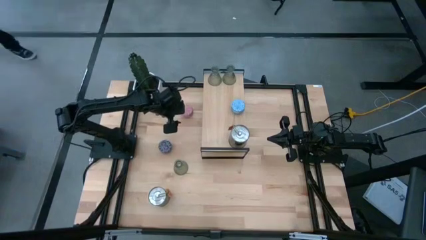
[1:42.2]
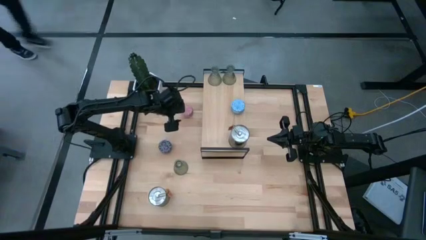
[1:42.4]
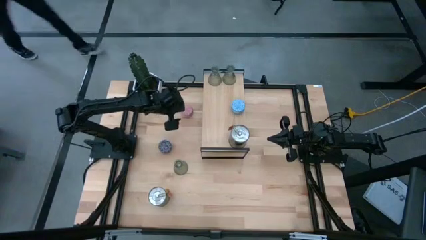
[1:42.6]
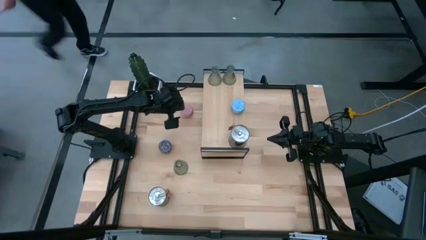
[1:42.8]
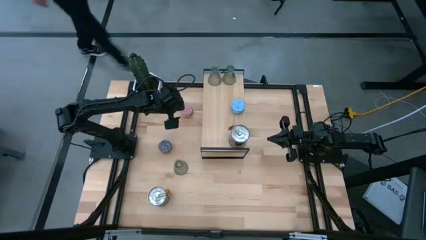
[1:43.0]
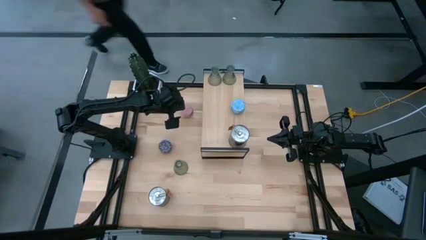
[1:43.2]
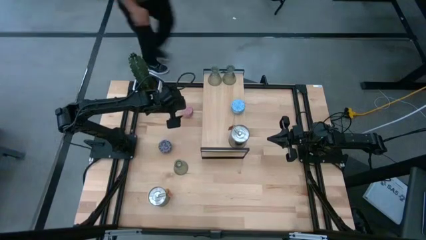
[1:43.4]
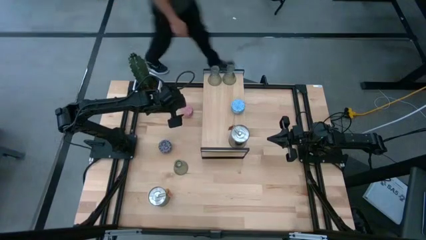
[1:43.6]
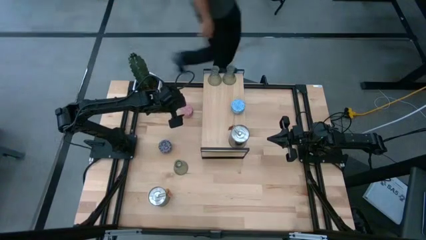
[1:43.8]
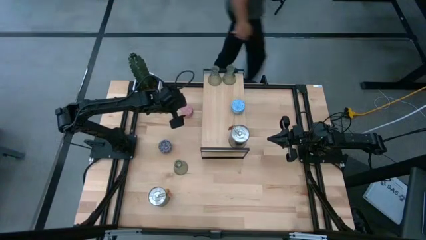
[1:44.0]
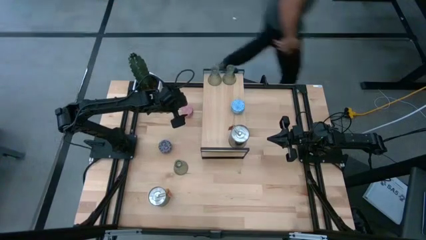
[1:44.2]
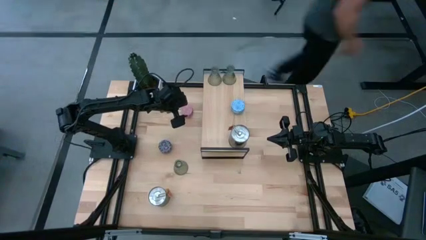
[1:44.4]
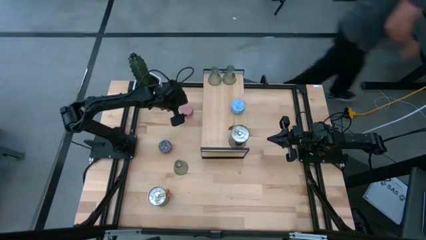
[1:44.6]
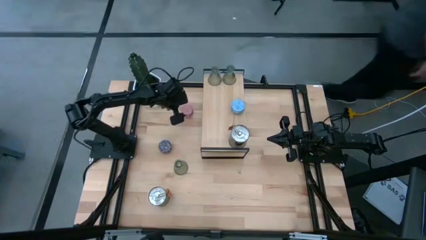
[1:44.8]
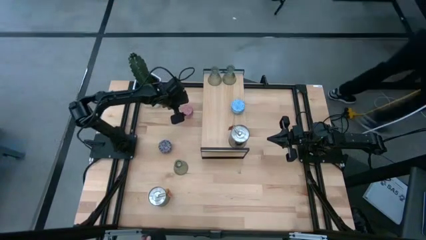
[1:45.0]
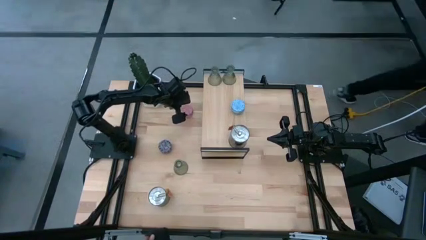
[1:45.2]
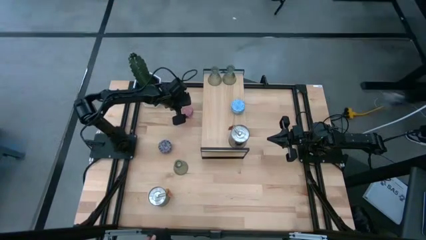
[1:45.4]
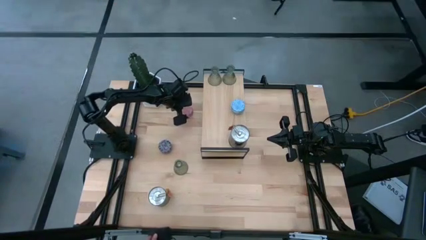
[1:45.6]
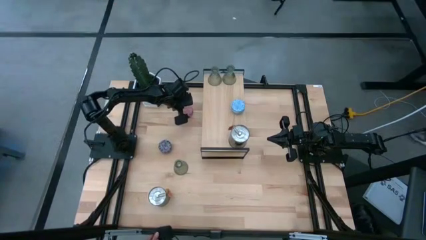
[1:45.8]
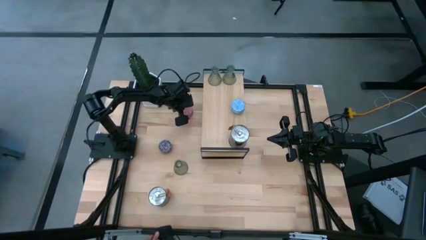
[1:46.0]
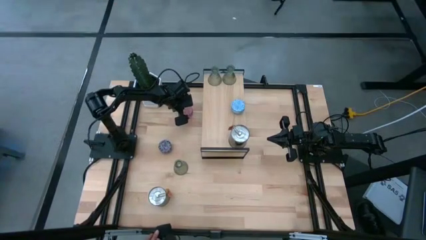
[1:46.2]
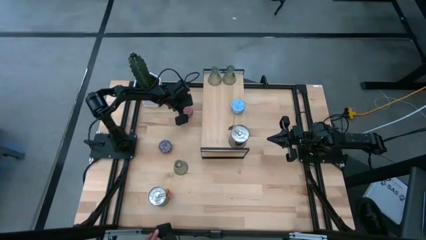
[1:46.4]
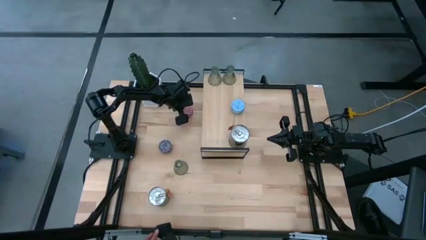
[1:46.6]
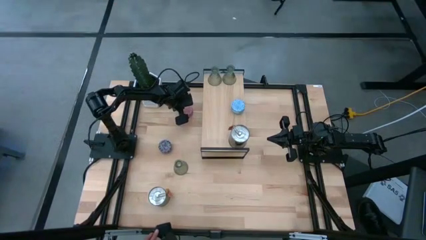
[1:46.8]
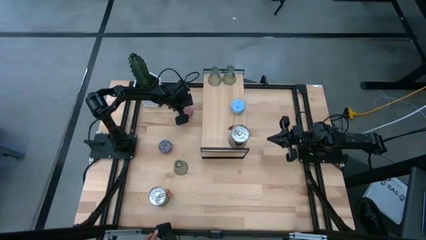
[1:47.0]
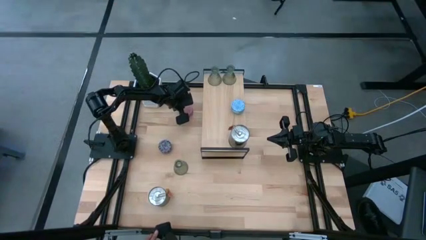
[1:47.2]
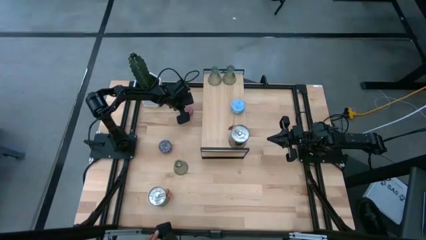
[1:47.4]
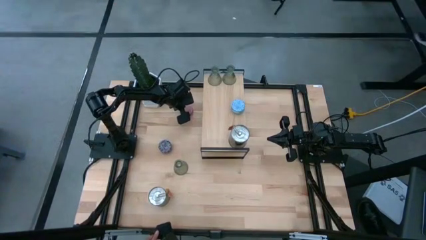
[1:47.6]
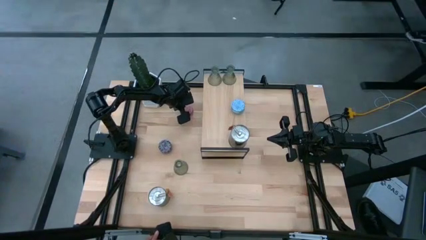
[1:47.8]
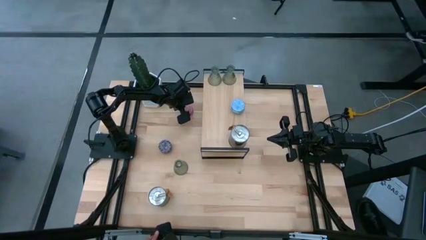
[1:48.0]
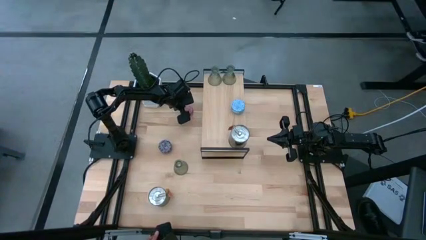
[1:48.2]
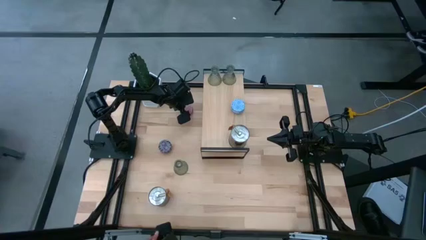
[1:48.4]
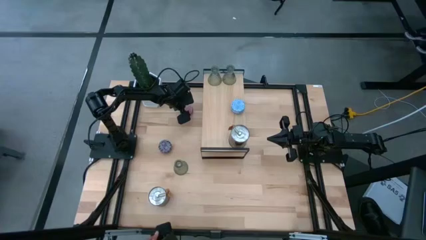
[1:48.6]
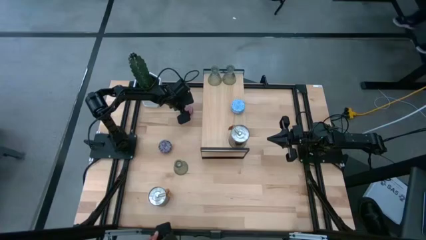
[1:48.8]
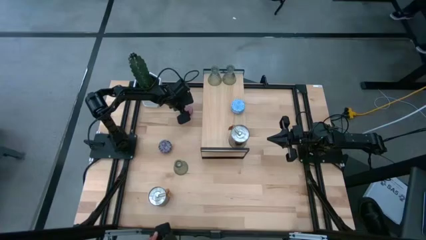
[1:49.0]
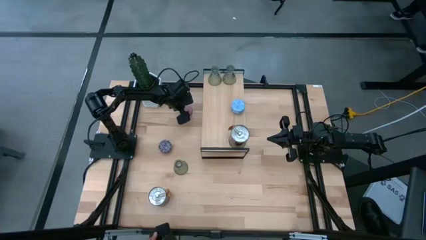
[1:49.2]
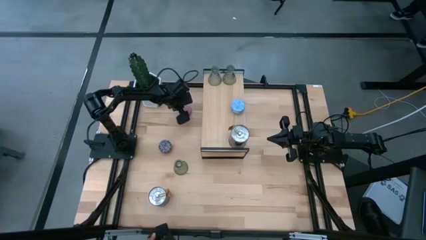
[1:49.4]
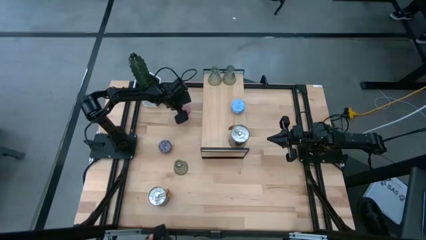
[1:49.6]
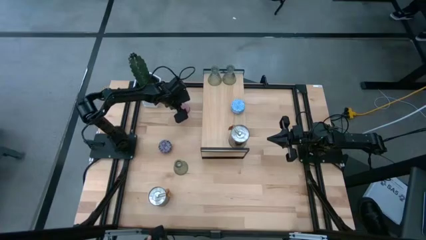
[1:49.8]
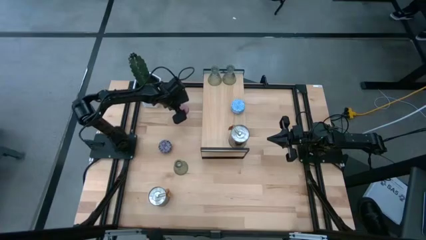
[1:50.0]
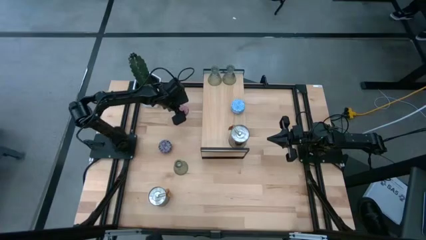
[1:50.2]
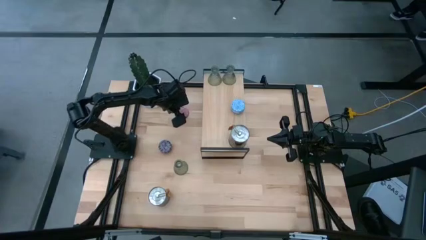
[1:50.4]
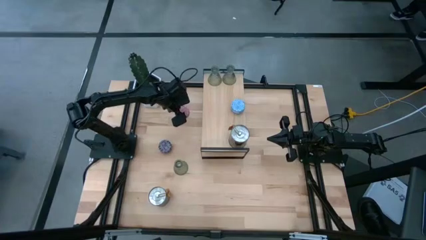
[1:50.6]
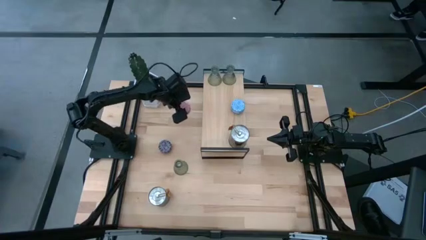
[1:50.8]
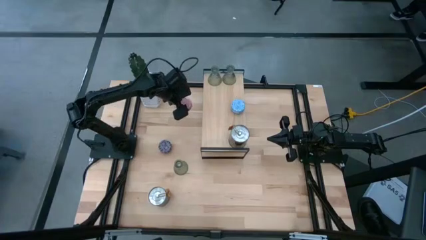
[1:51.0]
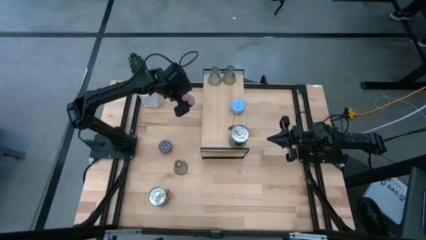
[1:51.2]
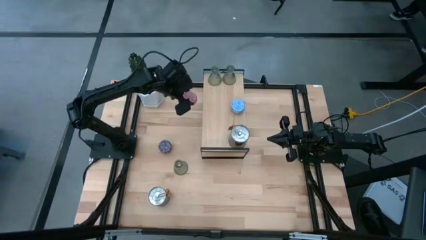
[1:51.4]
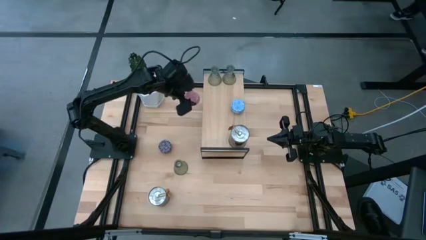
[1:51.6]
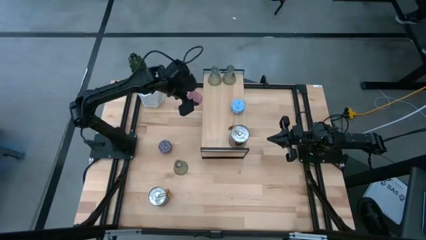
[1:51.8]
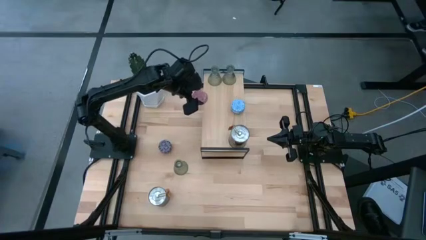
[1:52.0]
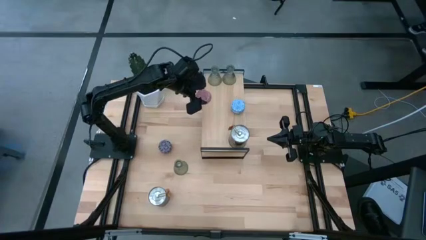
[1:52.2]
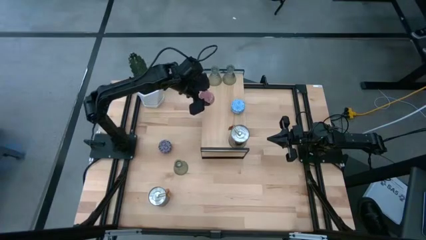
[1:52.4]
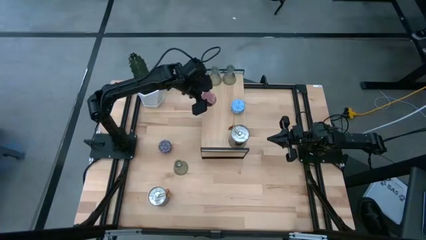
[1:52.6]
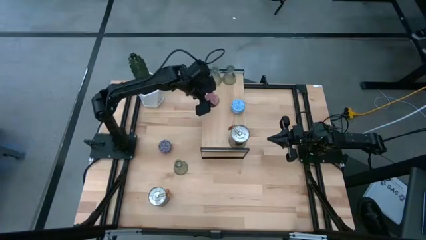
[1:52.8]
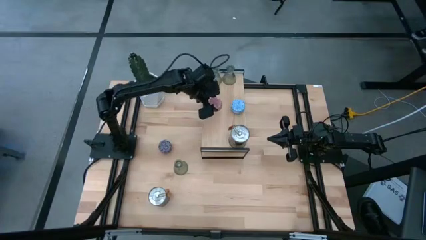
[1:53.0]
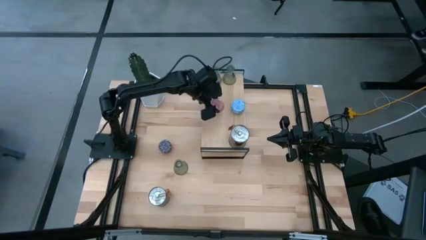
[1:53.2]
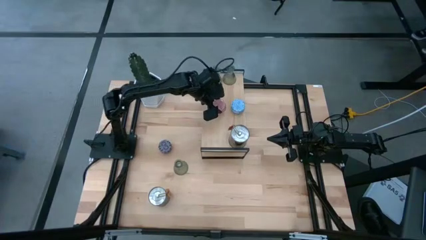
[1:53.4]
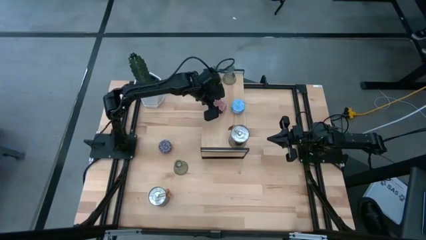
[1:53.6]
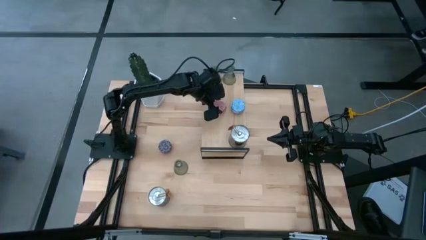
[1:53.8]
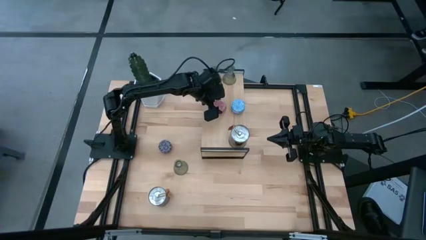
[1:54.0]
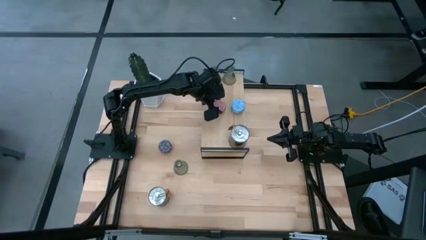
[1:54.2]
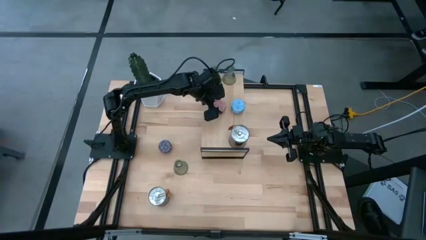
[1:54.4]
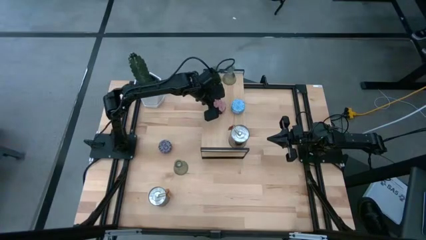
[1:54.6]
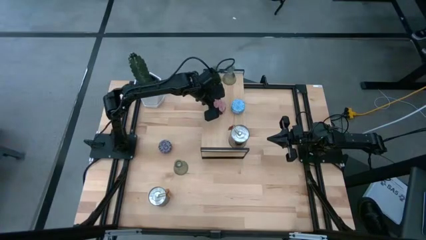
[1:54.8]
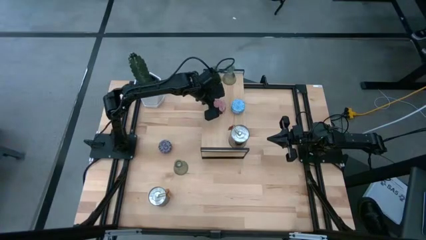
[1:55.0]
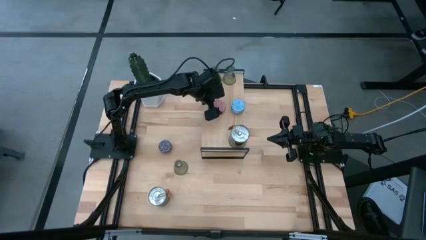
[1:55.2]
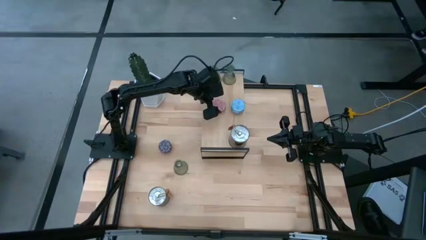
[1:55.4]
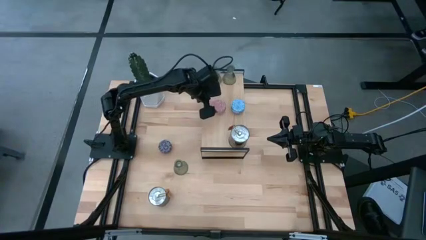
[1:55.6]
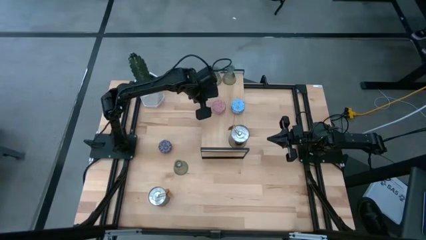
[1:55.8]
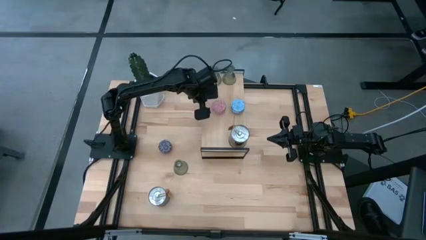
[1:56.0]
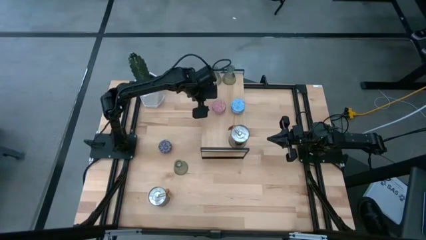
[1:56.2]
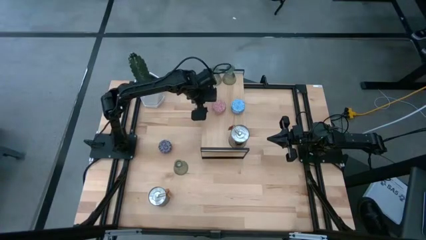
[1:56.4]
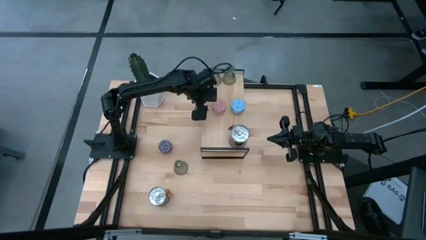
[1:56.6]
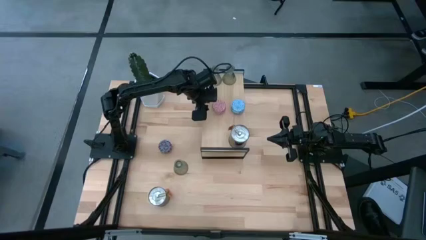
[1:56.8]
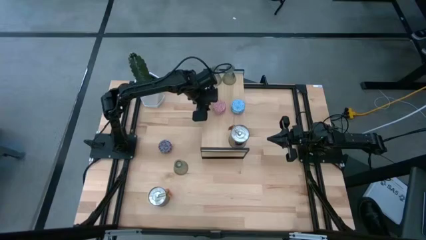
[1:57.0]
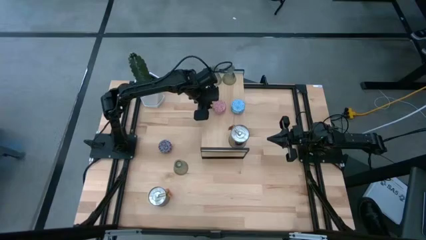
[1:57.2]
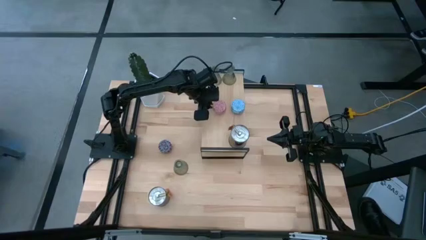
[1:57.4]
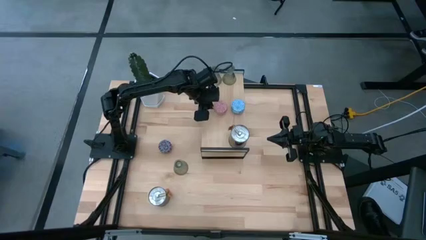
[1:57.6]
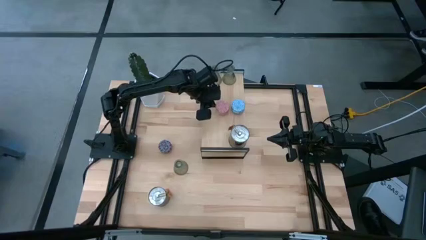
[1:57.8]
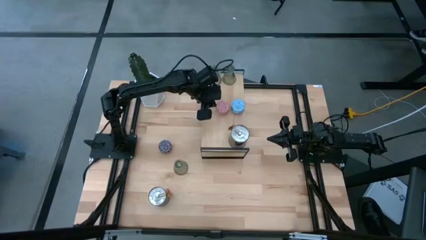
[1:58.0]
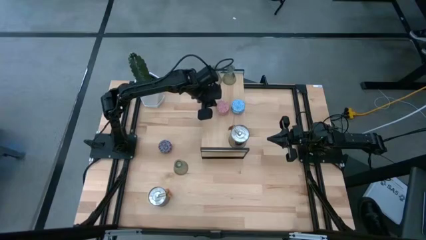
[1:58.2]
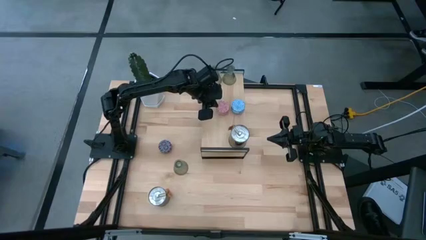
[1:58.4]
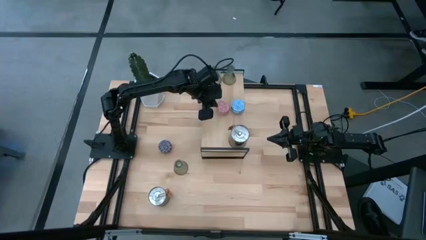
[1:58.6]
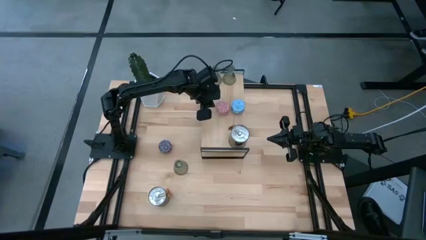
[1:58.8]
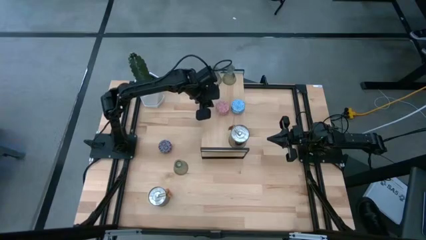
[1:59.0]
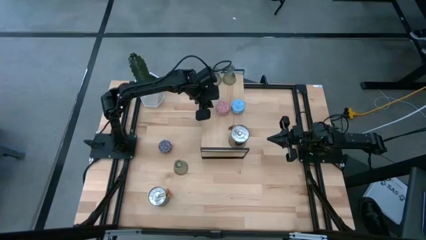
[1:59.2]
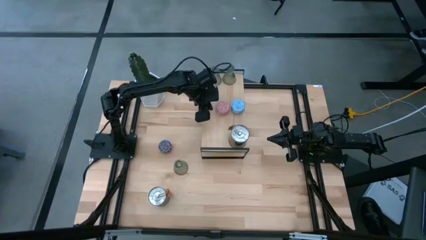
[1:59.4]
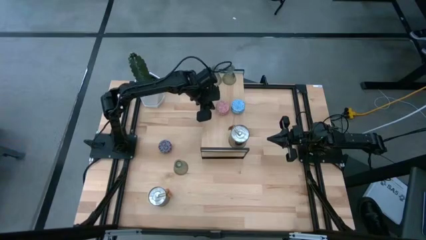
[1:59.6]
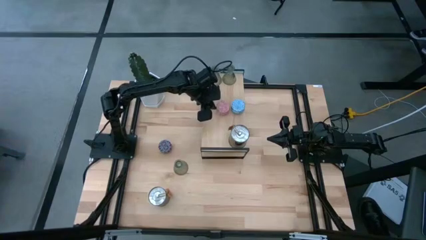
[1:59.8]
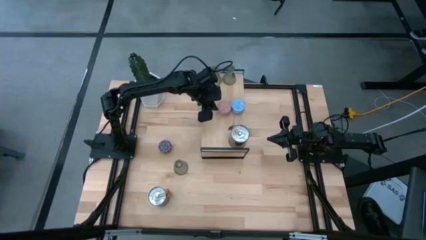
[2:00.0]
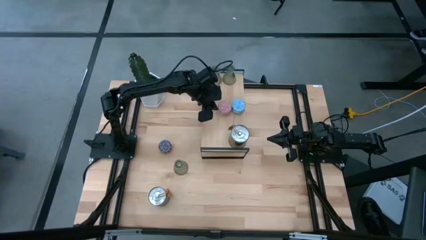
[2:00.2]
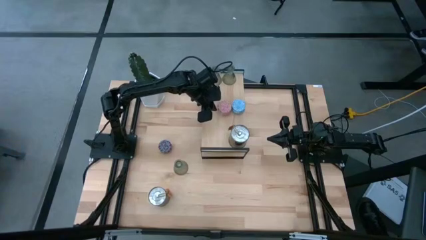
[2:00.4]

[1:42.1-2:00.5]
Task: Pick & Place candle stick holders
Put the pink scented candle on the shelf
